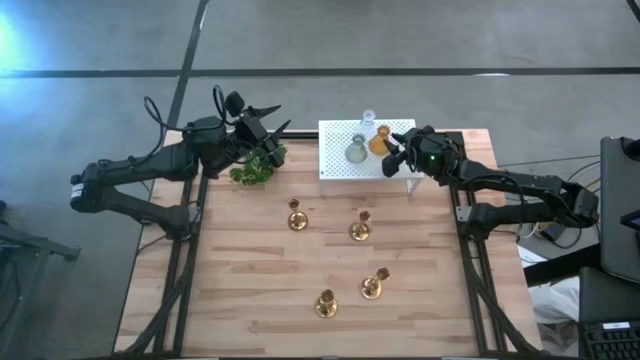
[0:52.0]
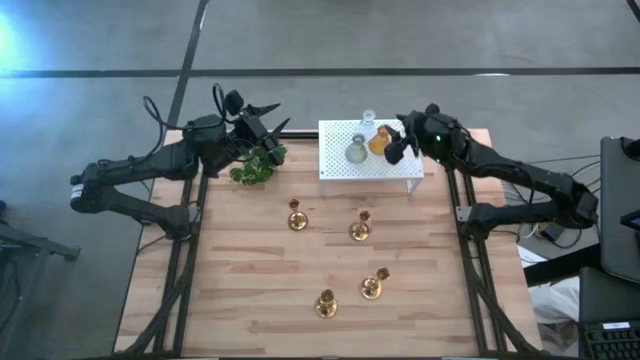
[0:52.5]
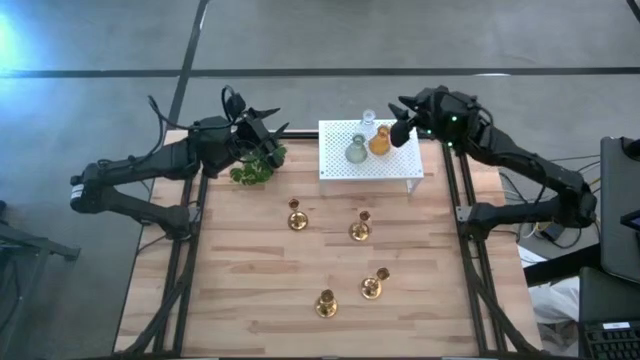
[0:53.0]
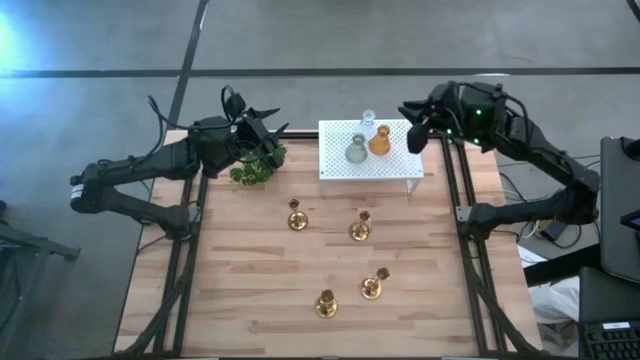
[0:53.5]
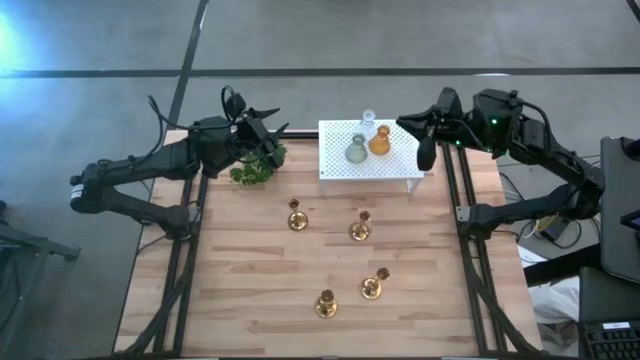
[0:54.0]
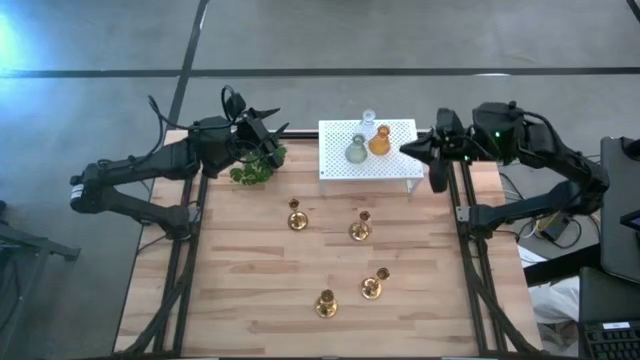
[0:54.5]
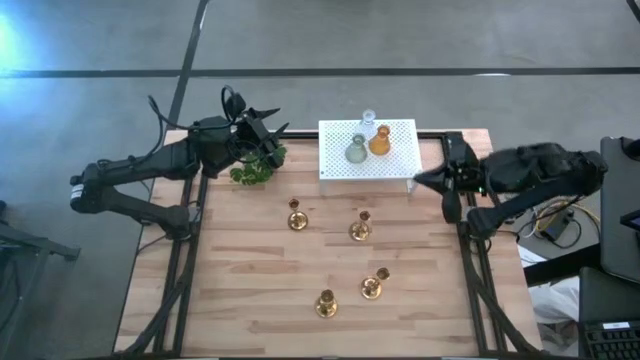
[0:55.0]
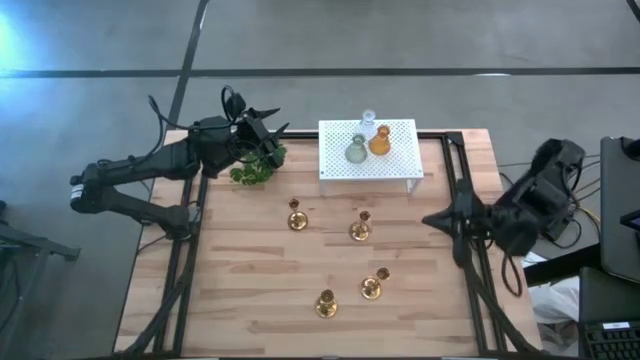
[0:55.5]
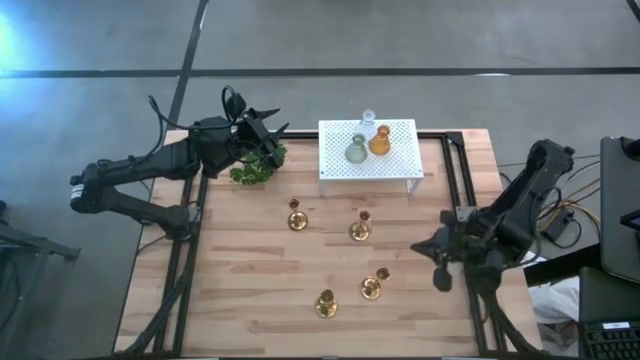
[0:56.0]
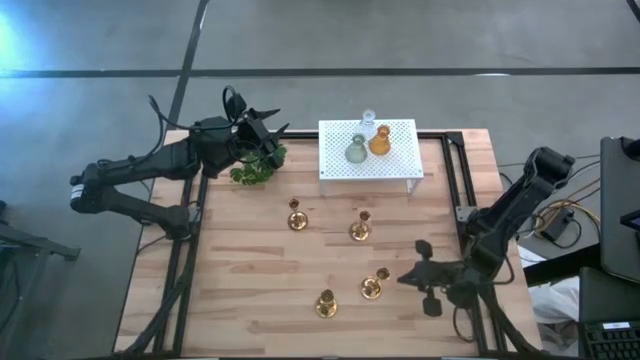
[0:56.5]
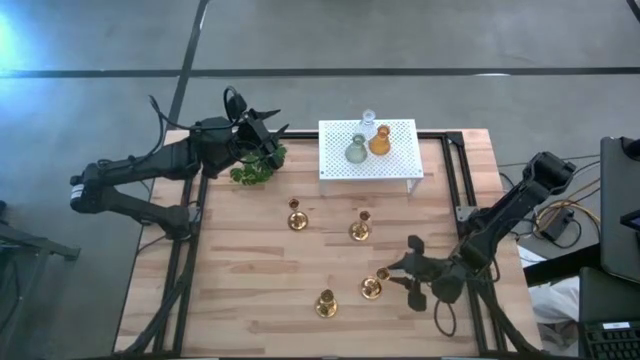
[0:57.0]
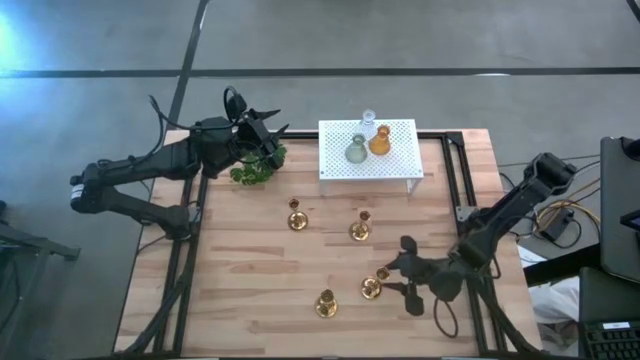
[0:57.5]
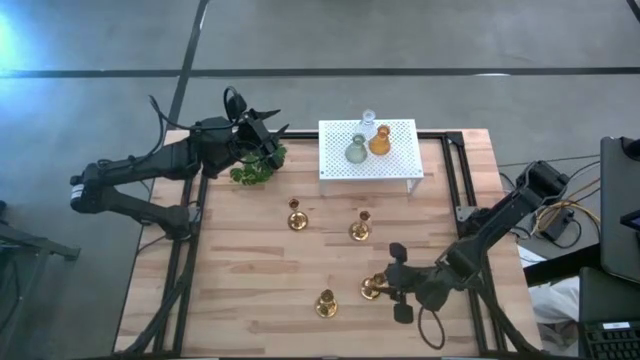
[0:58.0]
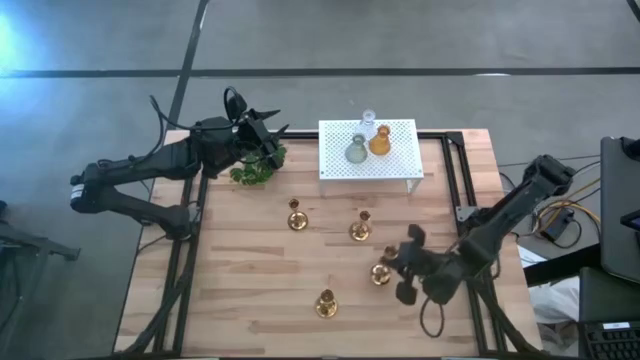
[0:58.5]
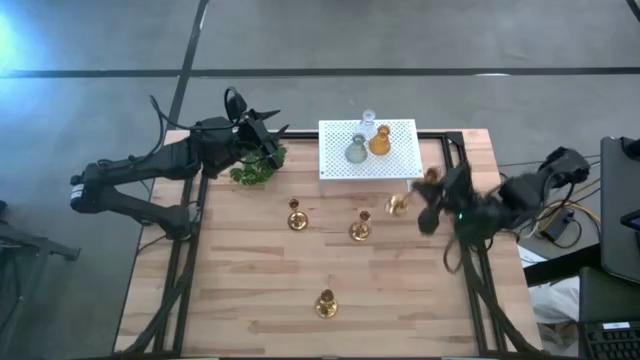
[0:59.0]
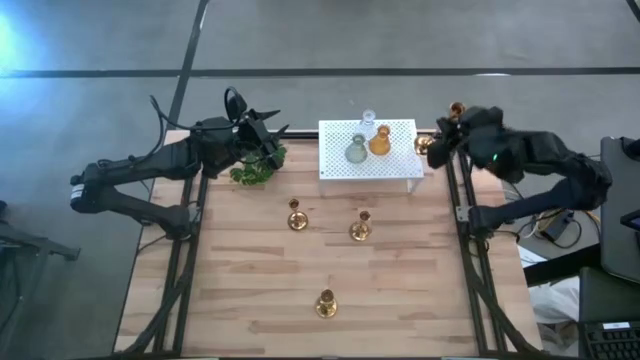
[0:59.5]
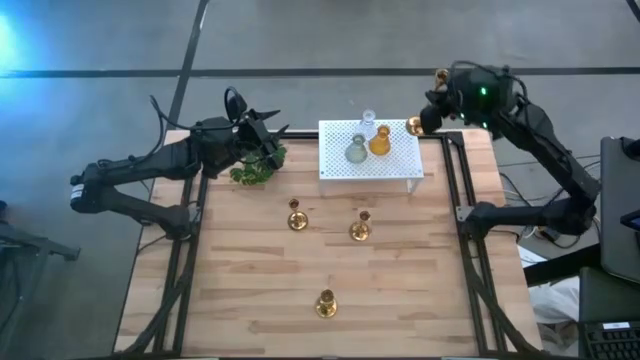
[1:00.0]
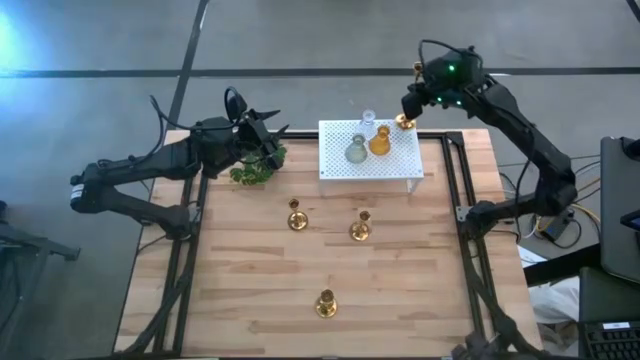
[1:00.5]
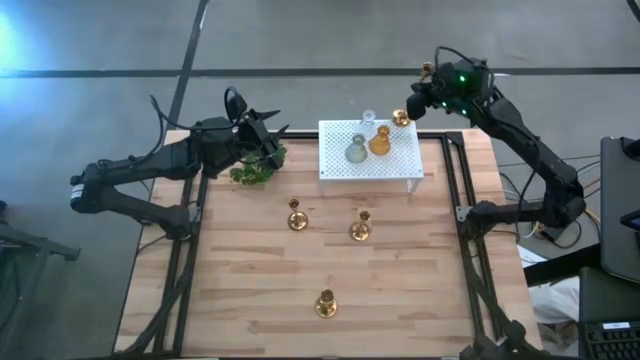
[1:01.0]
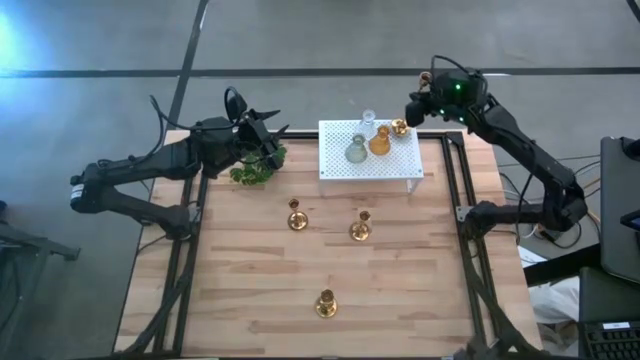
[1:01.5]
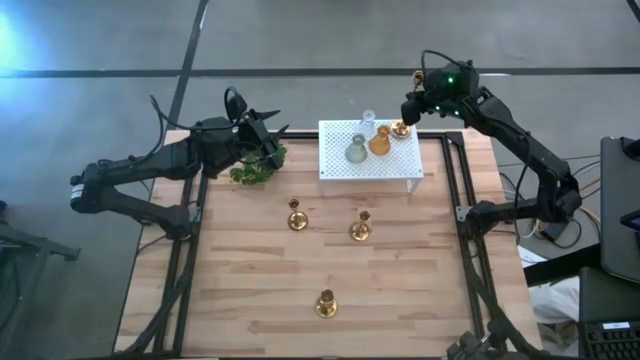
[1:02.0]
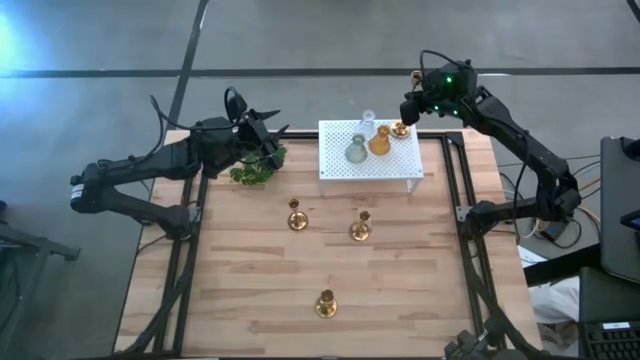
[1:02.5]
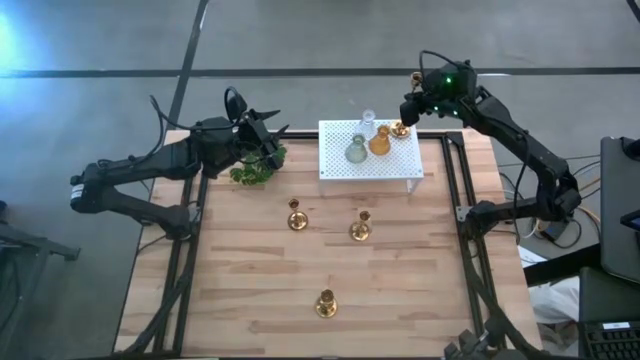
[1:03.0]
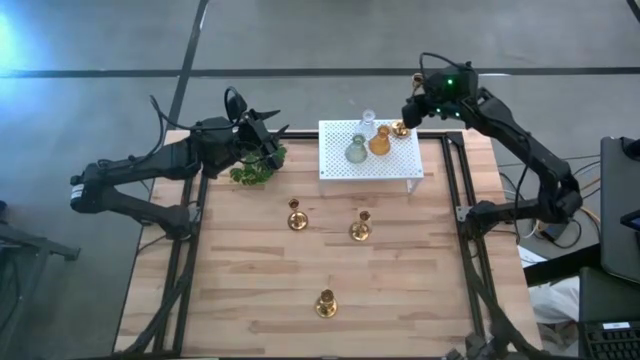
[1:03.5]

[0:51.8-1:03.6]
Task: Pick & Place candle stick holders
Put the golden candle holder on the shelf

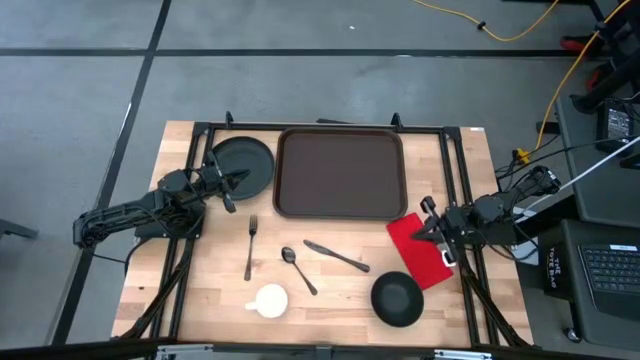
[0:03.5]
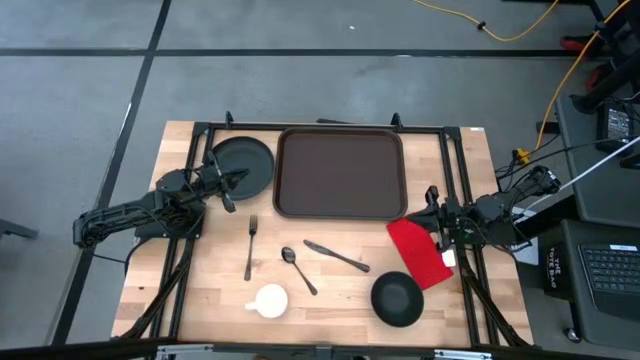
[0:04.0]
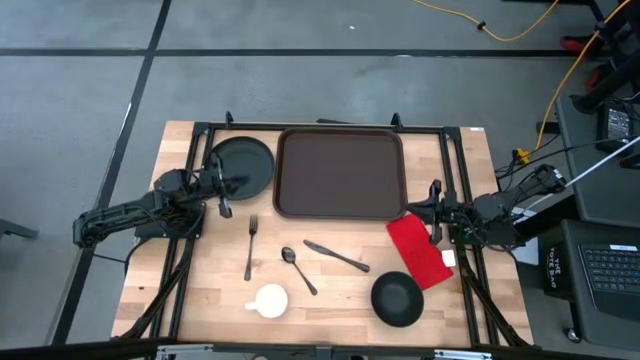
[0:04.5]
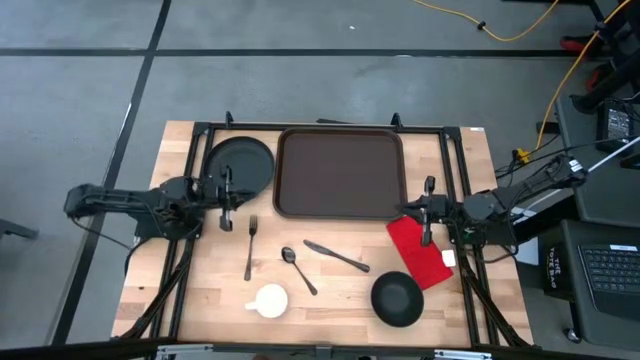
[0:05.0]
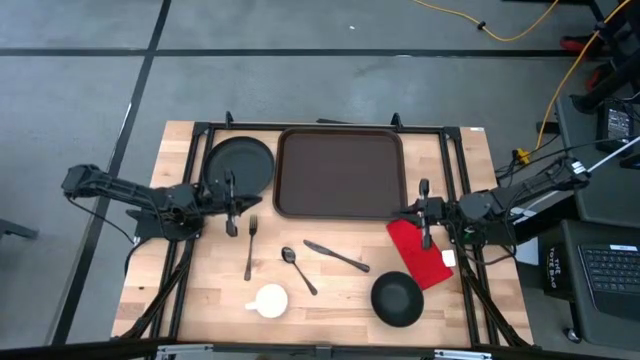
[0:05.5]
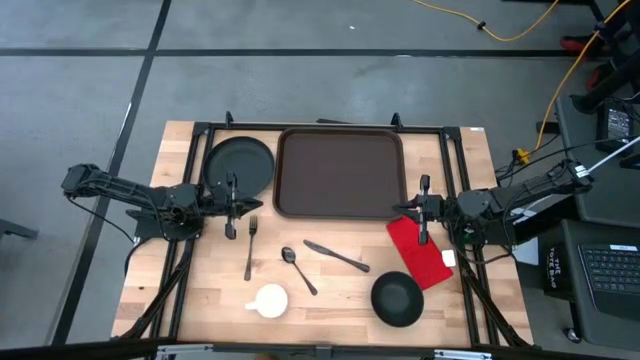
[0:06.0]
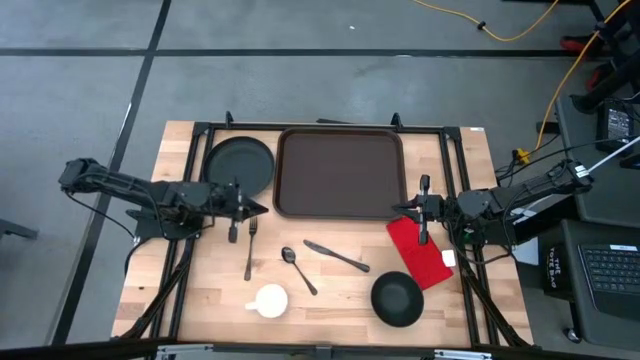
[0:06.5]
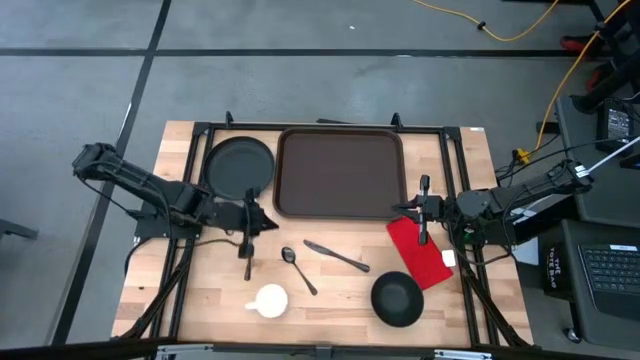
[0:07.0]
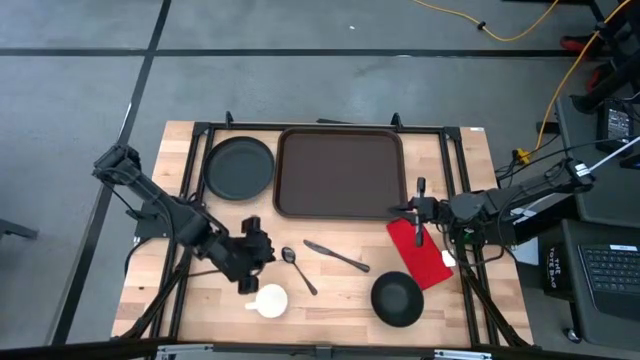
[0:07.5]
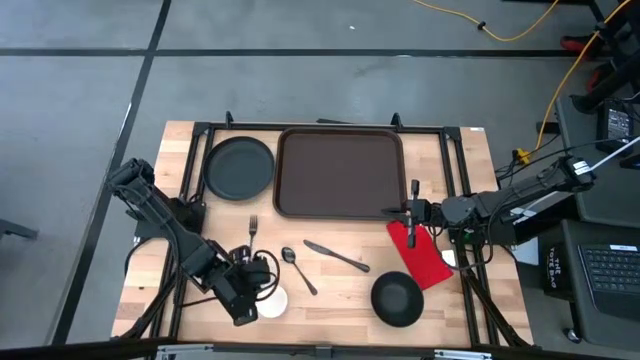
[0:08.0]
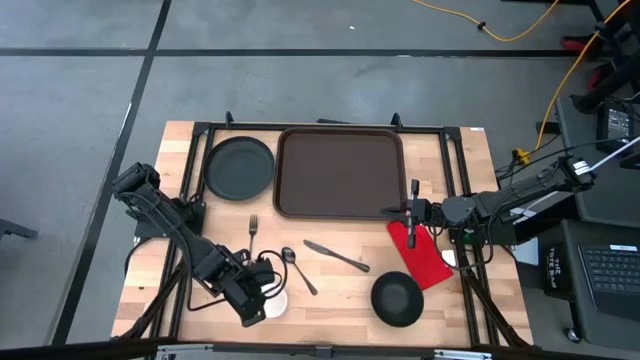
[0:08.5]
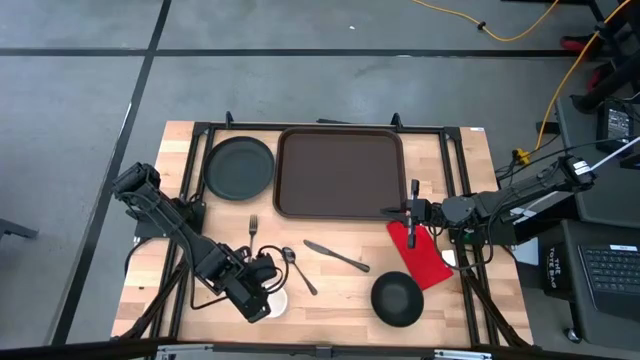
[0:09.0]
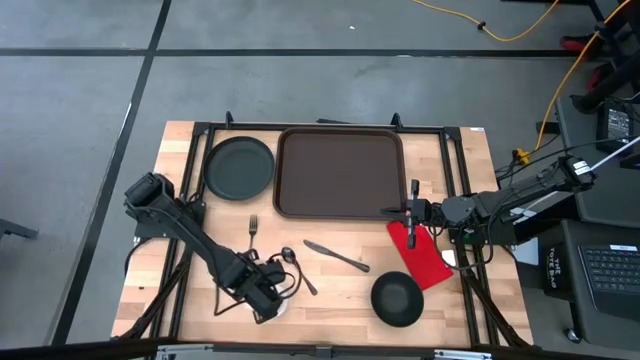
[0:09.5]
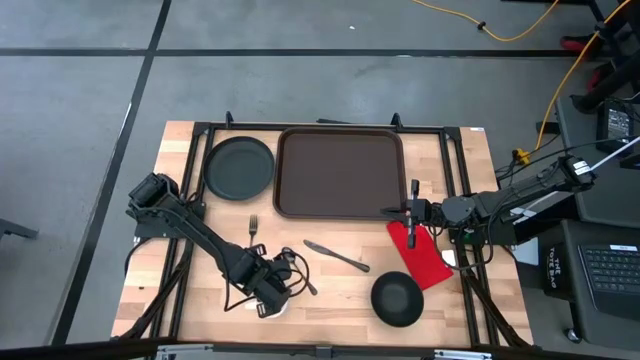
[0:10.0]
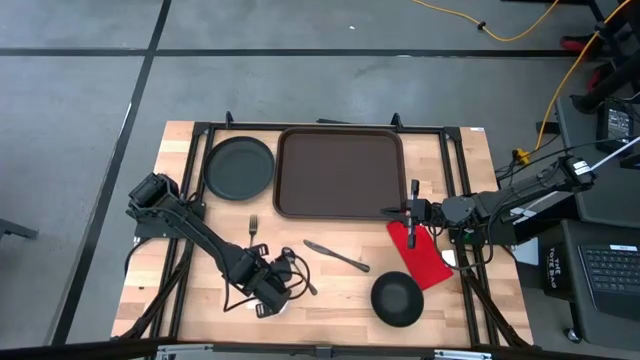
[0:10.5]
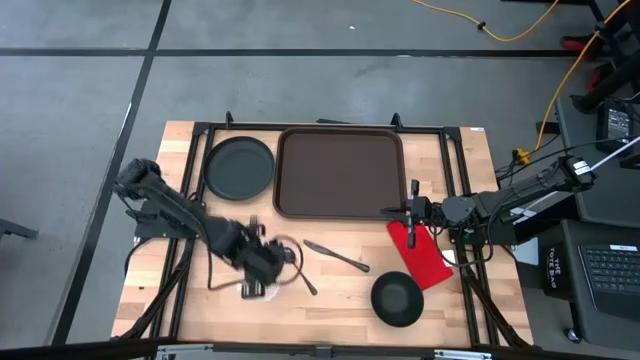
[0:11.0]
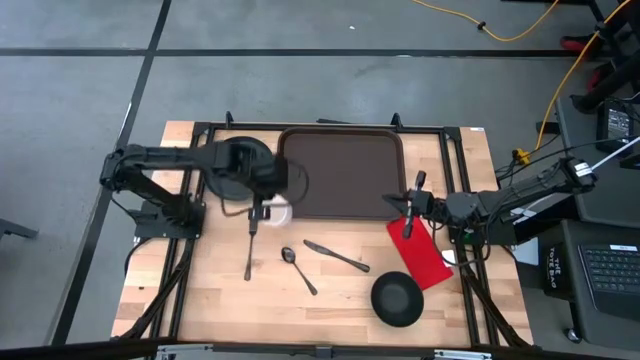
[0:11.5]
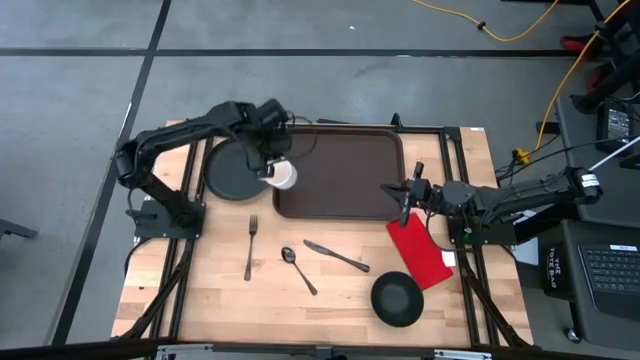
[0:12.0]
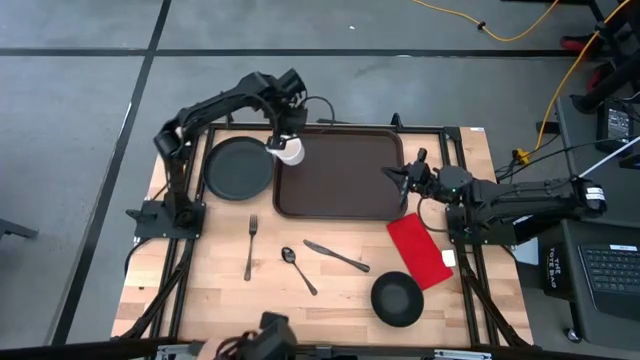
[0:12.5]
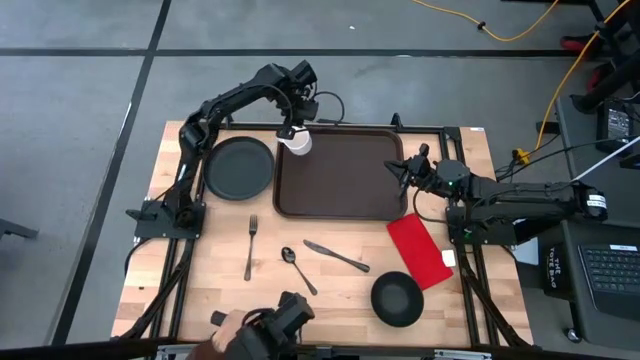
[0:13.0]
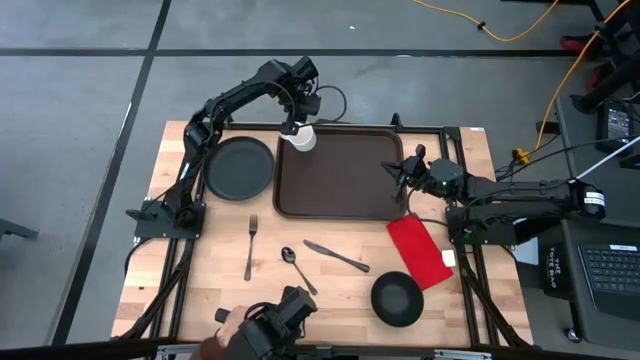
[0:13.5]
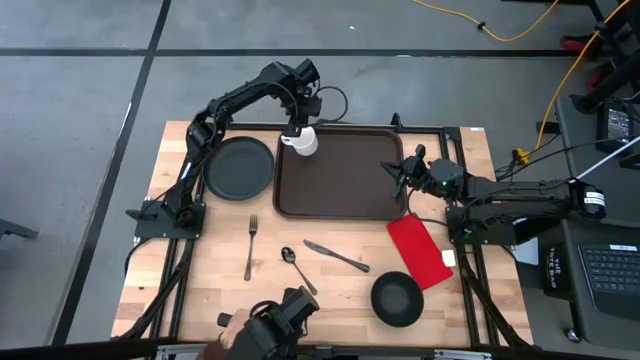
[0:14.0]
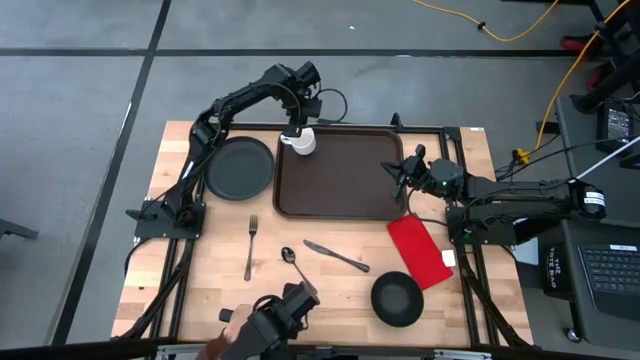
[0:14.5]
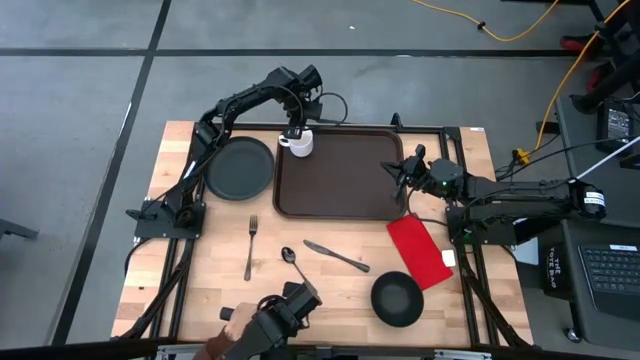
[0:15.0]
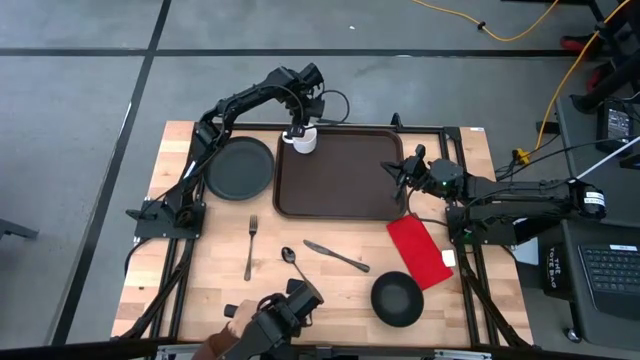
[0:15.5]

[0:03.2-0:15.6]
Task: Set up tray
Put the white mug on the brown serving tray
